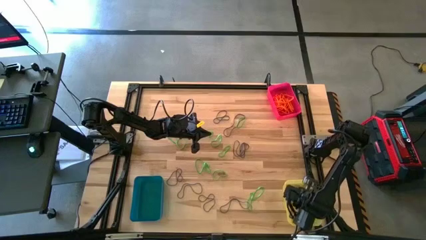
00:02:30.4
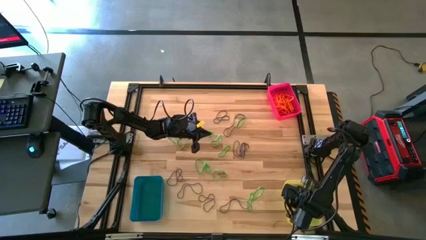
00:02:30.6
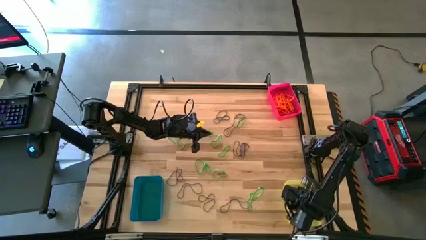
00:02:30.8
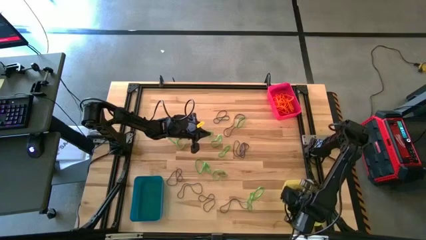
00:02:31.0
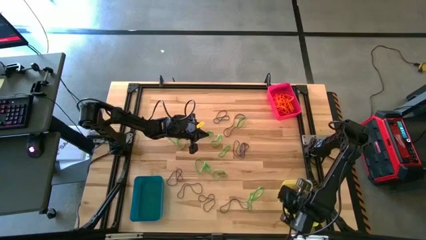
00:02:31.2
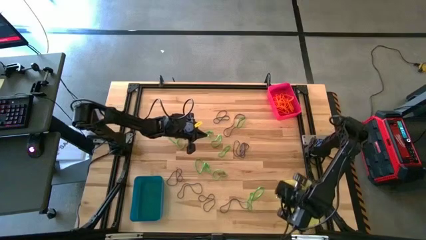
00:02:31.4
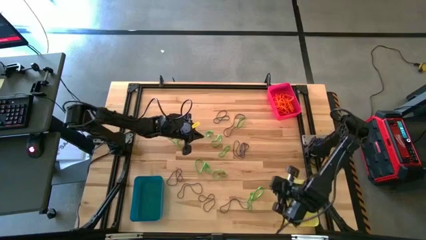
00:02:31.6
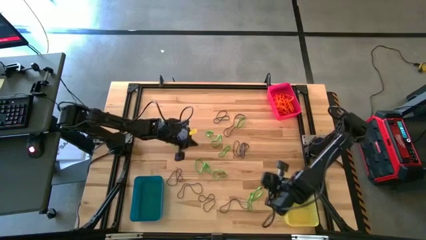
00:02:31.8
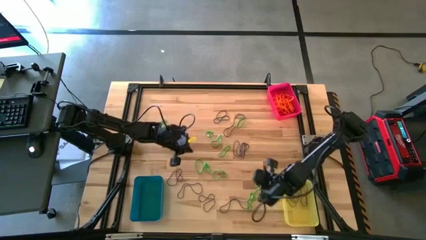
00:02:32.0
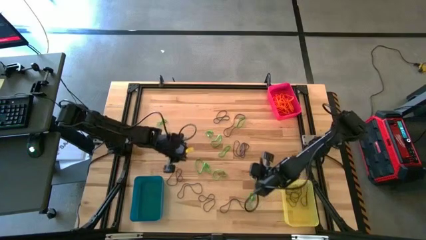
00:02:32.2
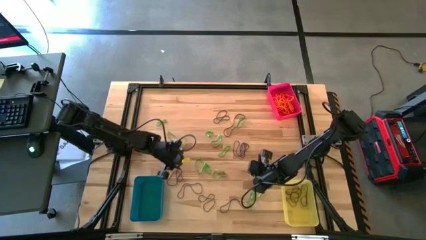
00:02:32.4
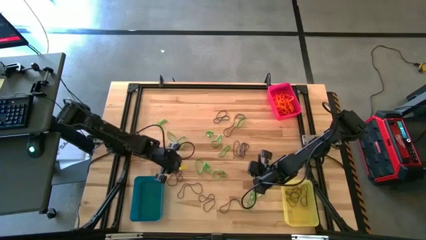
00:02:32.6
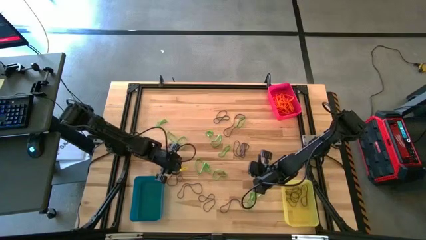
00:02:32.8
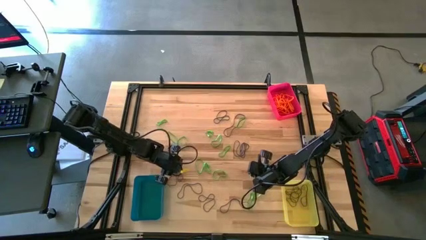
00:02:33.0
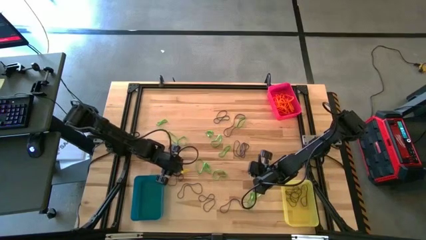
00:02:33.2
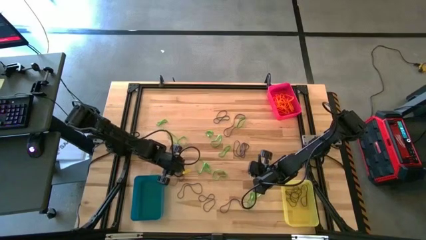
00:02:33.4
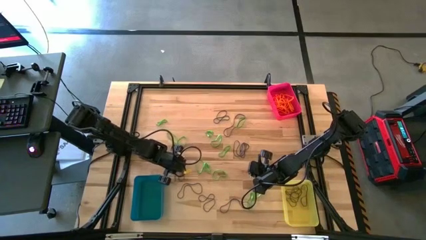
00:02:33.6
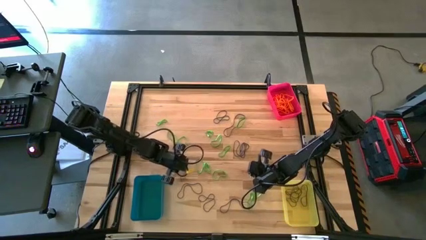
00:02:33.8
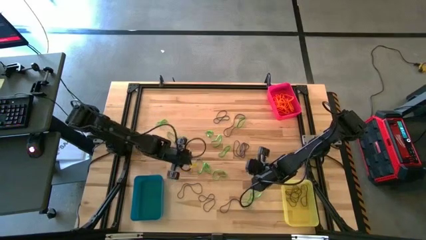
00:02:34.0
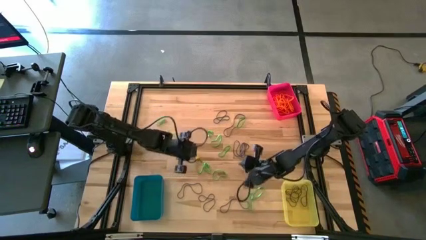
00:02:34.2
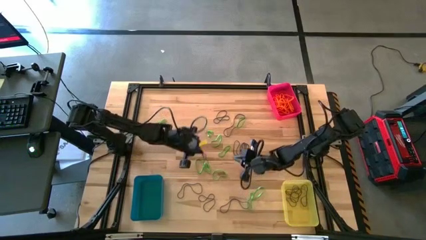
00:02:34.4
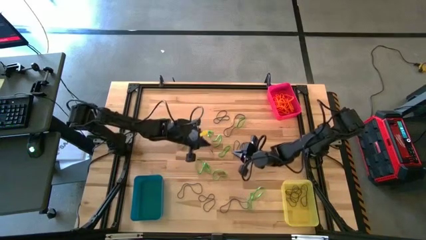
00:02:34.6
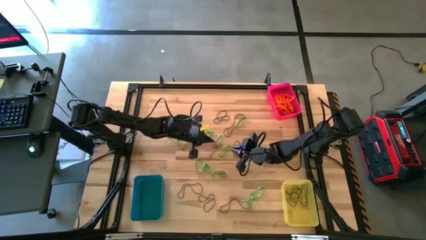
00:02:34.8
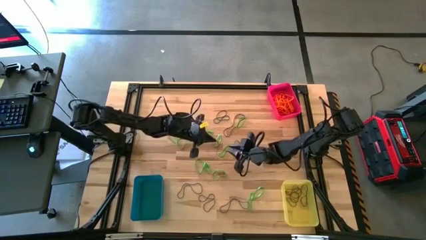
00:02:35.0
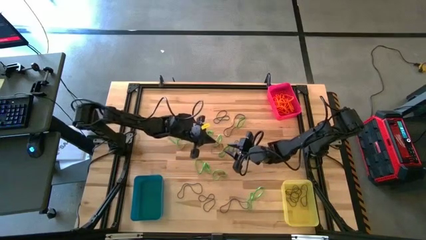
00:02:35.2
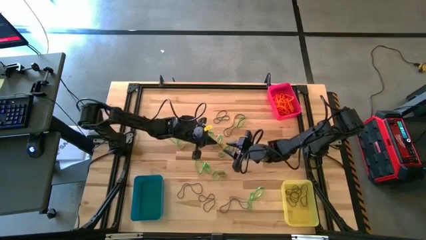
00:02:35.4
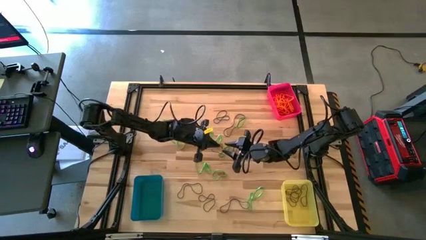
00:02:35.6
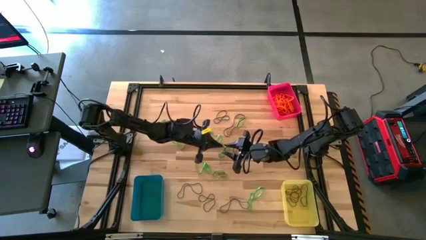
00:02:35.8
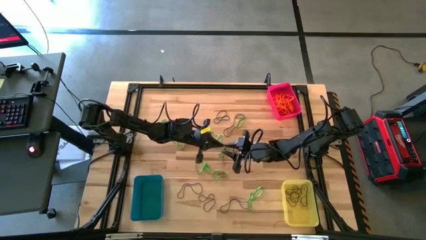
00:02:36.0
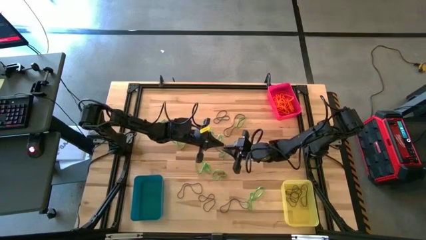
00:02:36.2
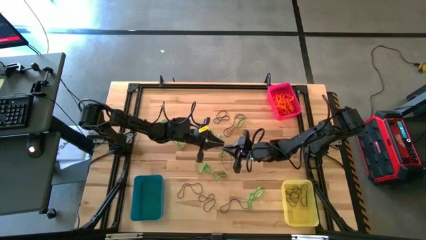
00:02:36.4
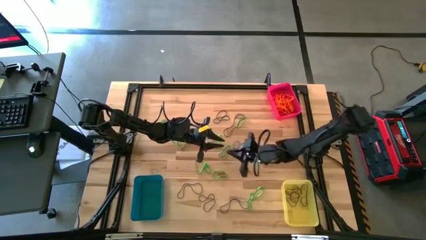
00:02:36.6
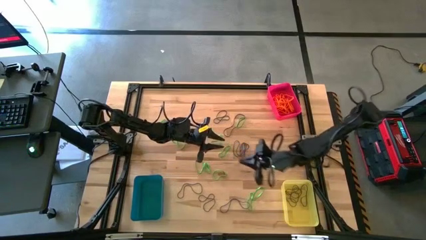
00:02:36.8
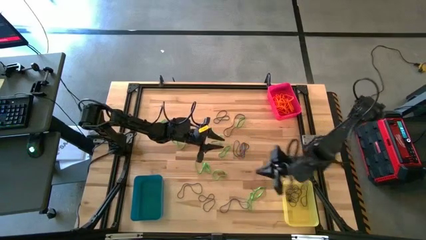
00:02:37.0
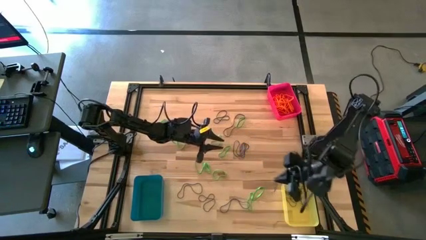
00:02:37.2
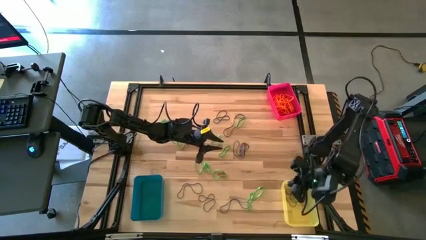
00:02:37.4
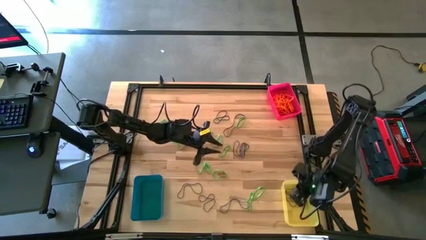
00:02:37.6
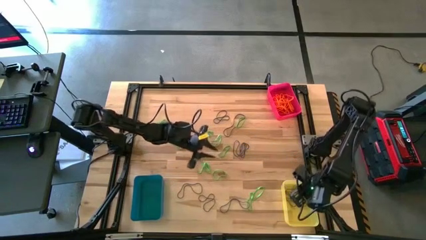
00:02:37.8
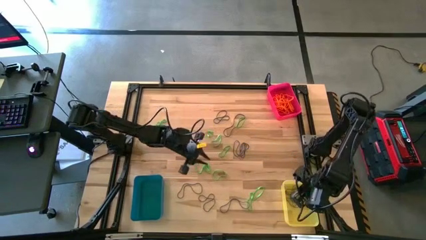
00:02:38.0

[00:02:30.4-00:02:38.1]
Task: Sort rubber bands into baskets
Put the purple rubber band into the yellow bin

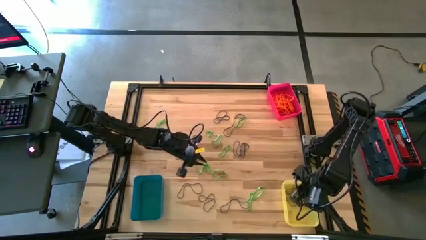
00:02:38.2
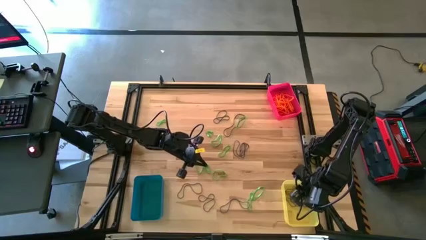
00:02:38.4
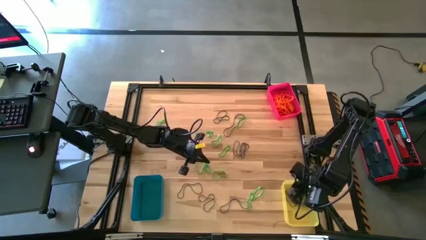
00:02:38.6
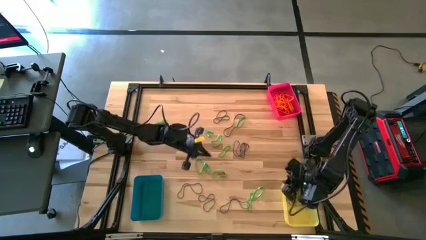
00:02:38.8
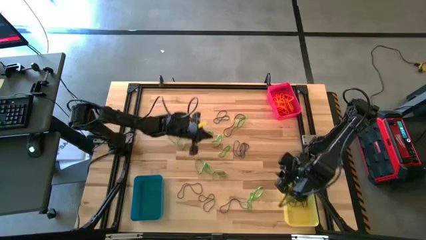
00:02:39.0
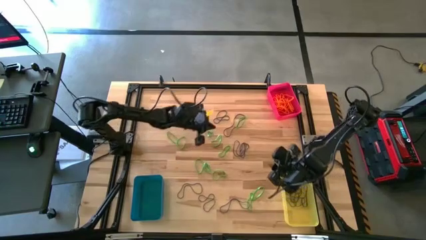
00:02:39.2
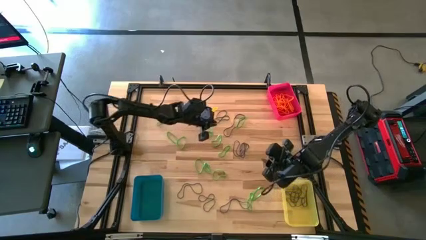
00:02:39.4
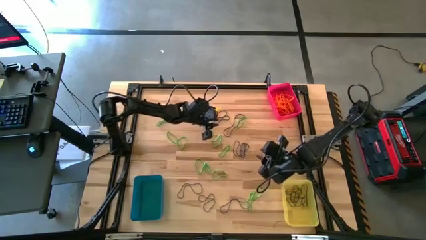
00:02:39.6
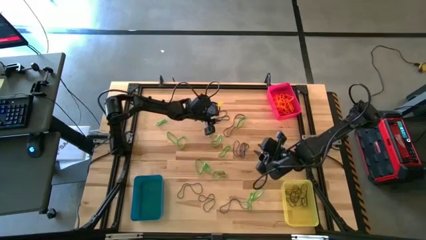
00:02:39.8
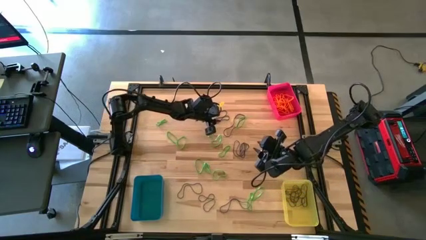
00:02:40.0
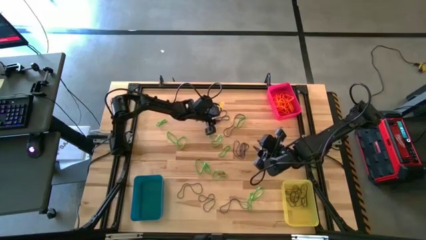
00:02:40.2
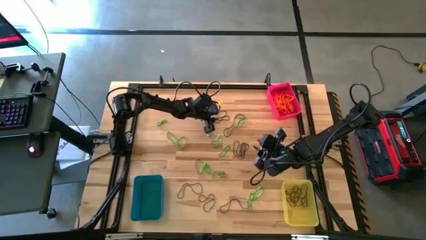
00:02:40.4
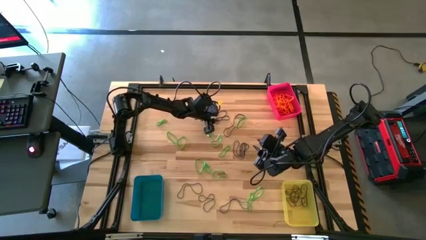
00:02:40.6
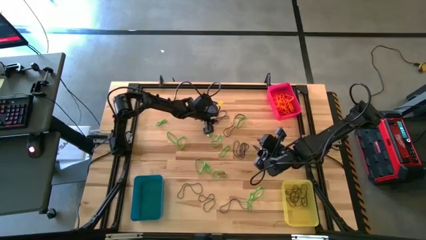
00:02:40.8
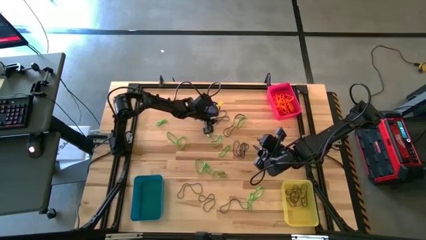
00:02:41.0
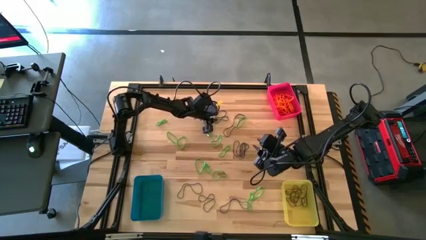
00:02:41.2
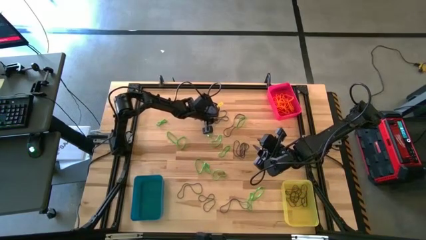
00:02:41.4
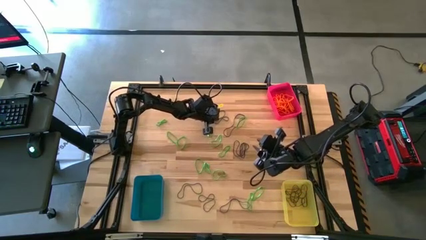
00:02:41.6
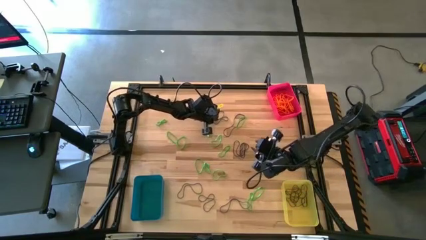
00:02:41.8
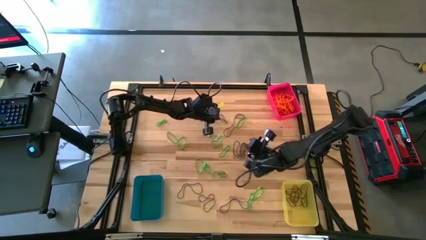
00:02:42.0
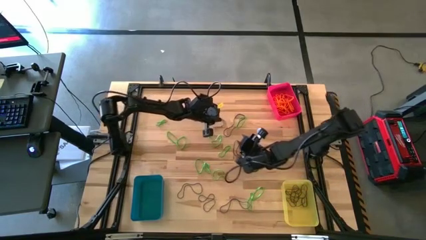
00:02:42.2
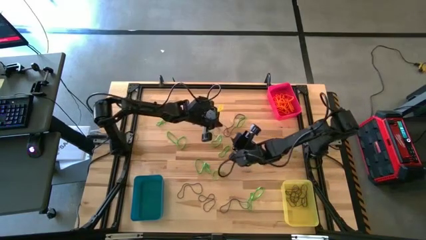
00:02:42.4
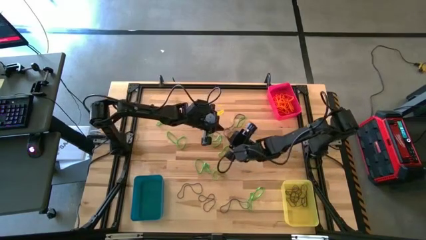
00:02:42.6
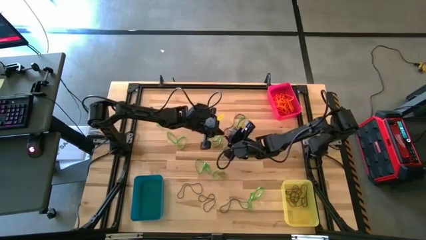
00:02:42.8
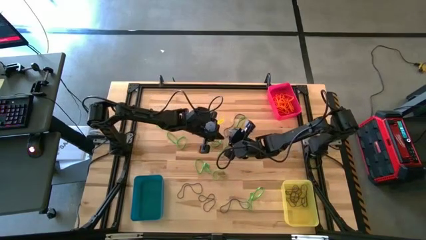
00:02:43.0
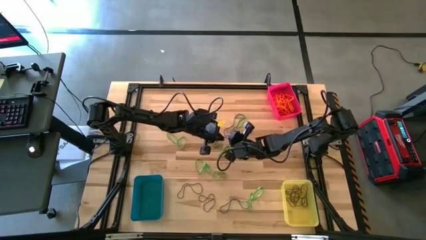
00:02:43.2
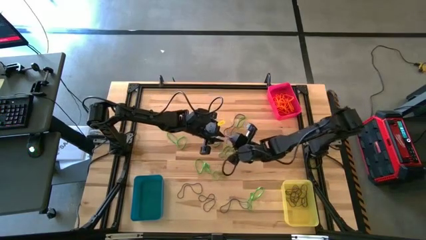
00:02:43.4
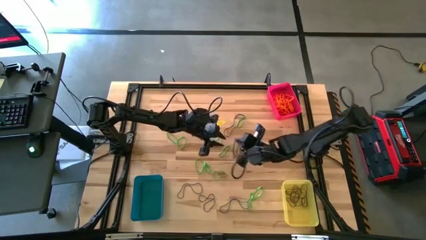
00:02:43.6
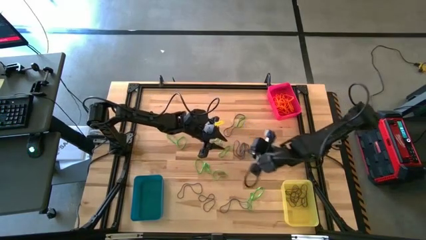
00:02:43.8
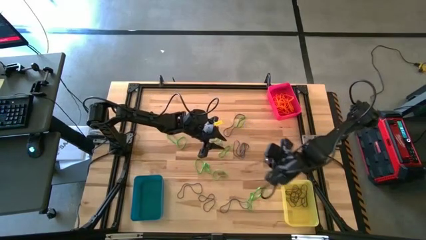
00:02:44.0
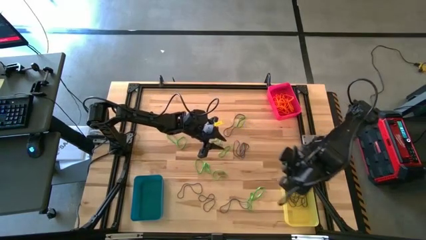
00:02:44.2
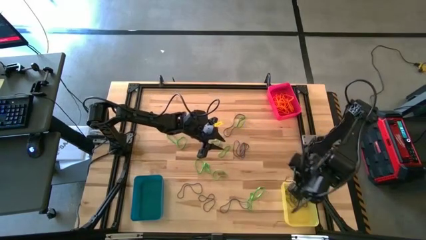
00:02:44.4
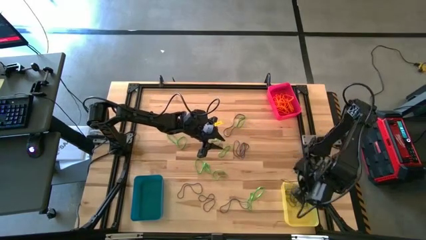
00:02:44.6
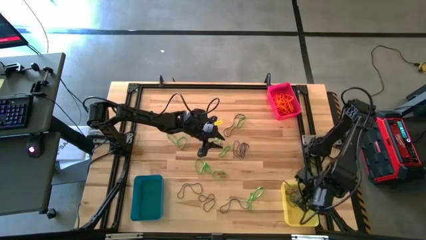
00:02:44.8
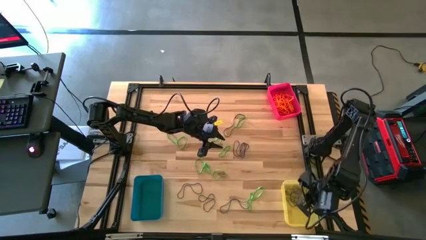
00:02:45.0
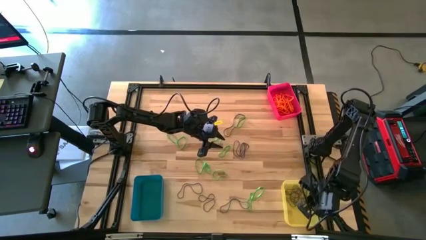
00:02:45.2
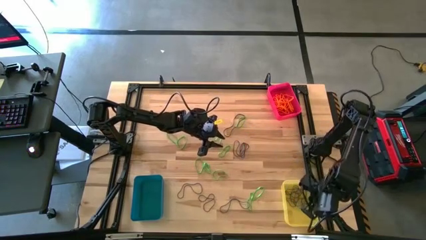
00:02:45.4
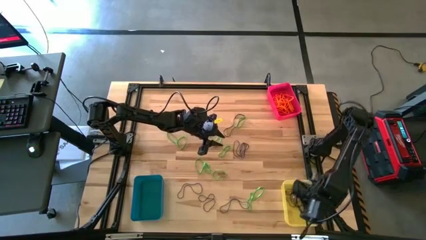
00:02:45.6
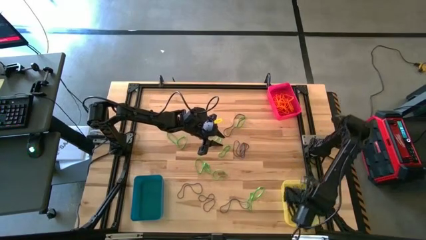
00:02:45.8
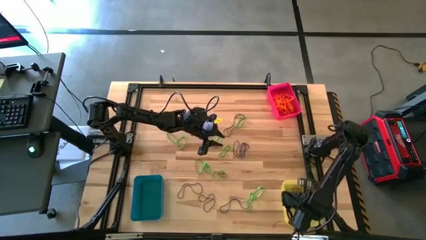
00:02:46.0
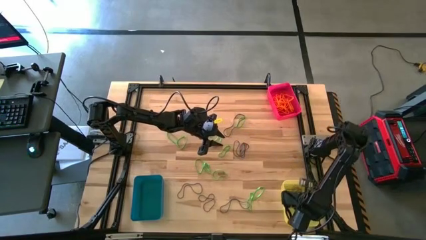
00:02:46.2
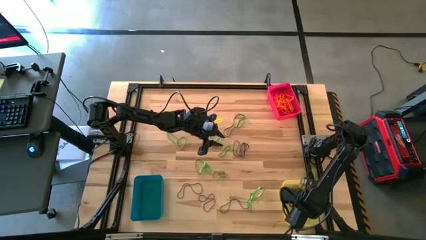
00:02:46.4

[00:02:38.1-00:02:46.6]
Put the purple rubber band into the yellow bin
